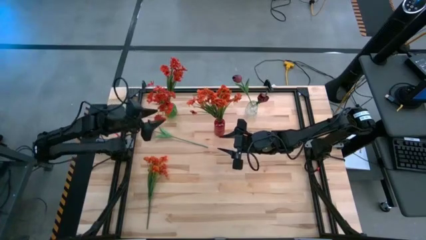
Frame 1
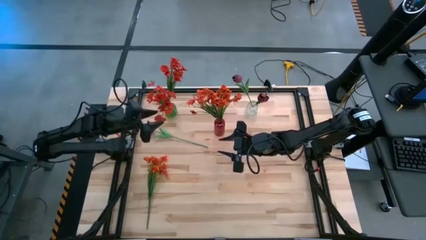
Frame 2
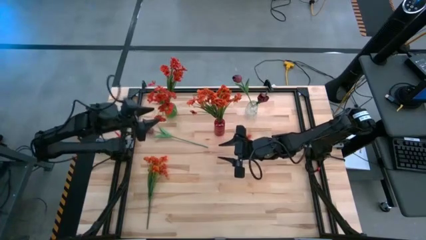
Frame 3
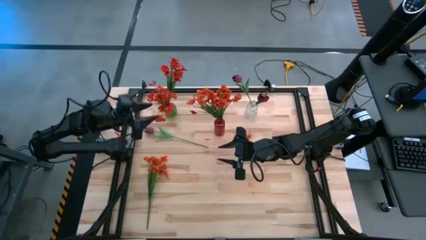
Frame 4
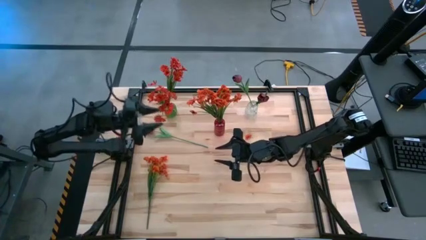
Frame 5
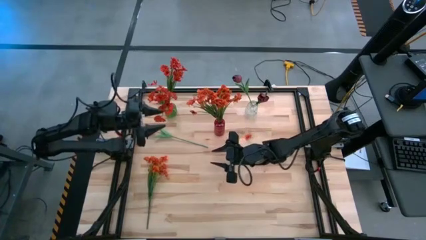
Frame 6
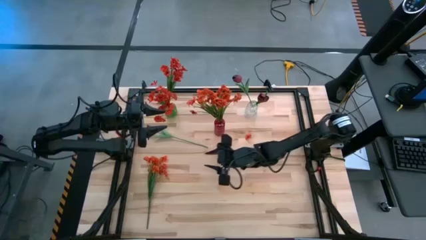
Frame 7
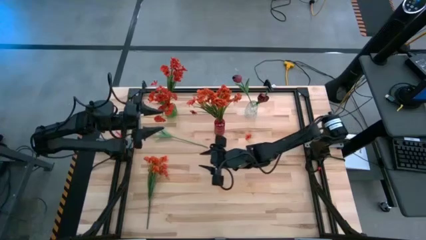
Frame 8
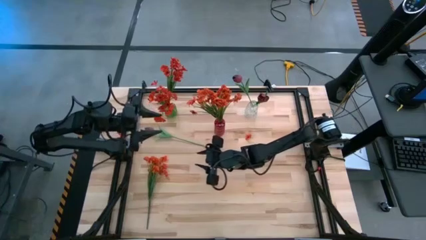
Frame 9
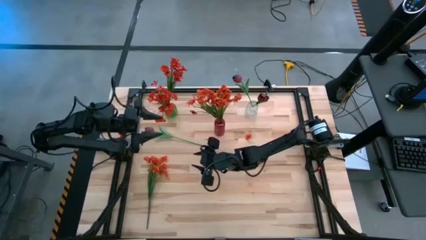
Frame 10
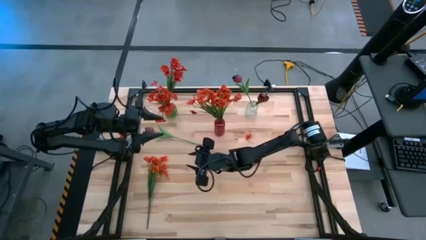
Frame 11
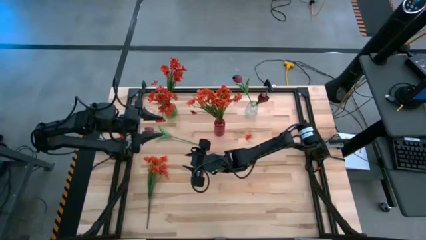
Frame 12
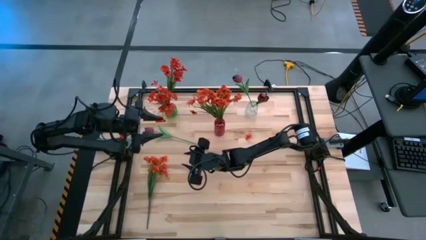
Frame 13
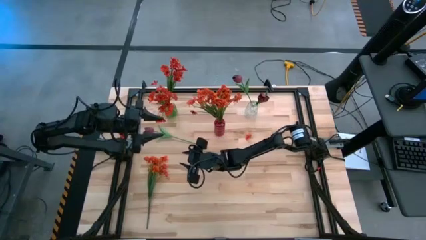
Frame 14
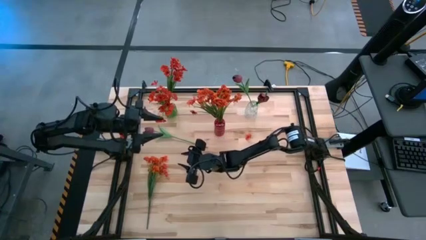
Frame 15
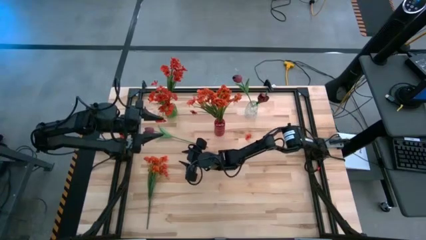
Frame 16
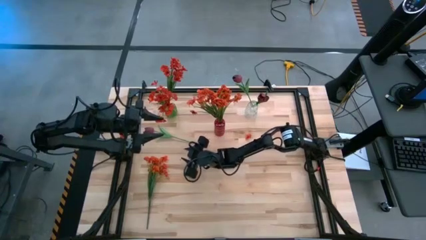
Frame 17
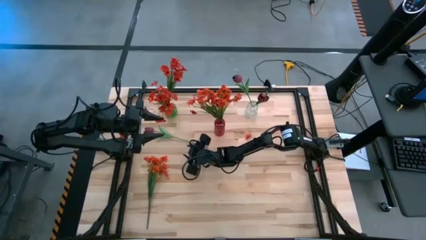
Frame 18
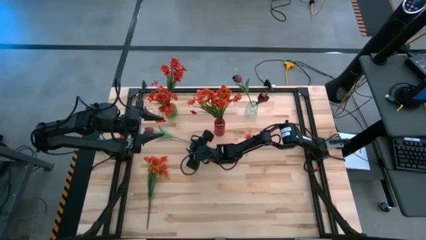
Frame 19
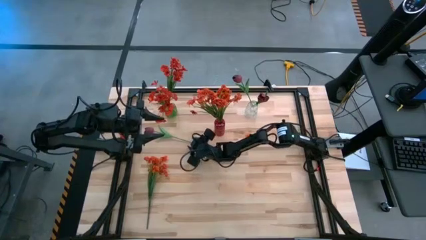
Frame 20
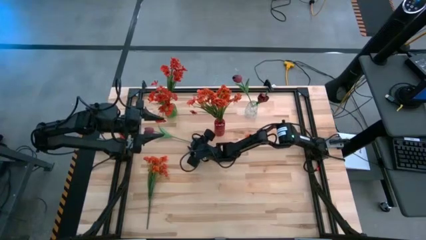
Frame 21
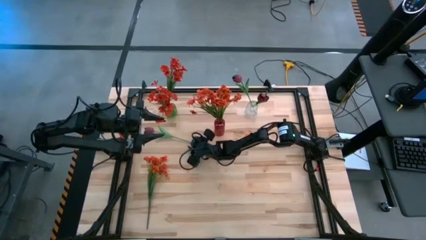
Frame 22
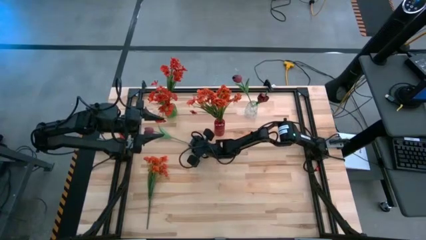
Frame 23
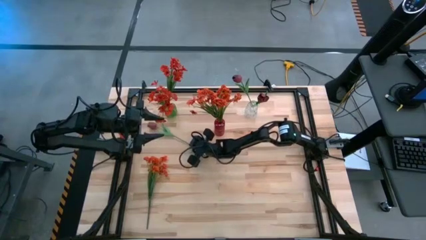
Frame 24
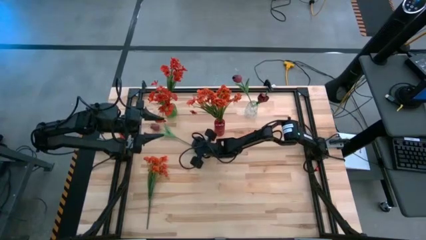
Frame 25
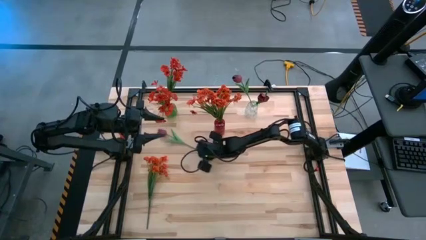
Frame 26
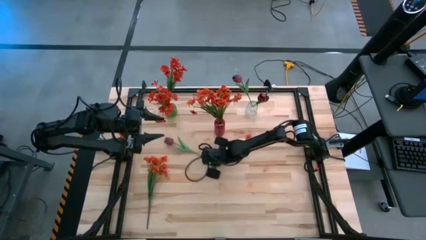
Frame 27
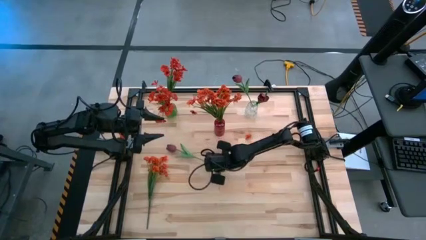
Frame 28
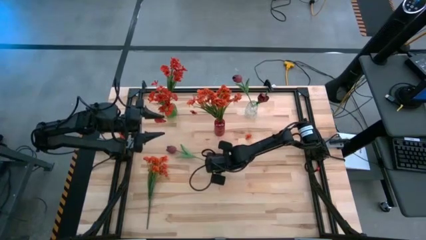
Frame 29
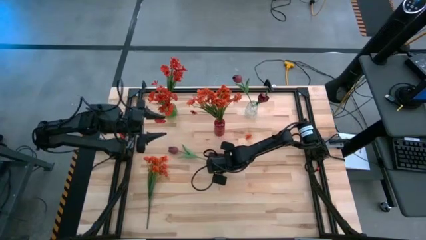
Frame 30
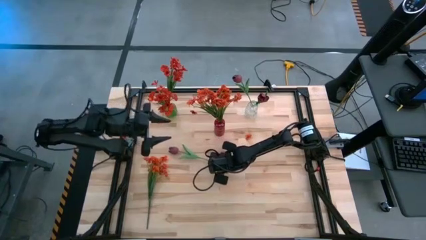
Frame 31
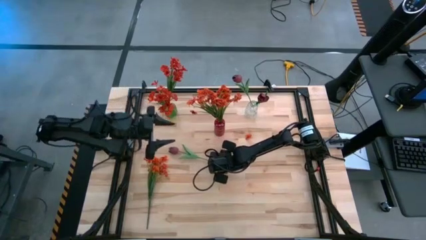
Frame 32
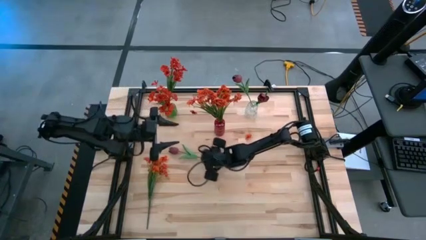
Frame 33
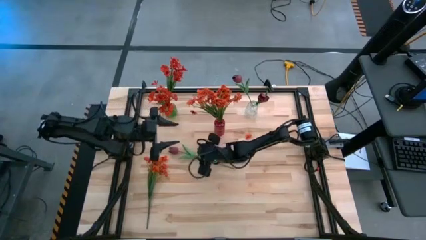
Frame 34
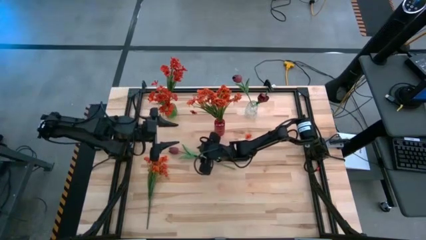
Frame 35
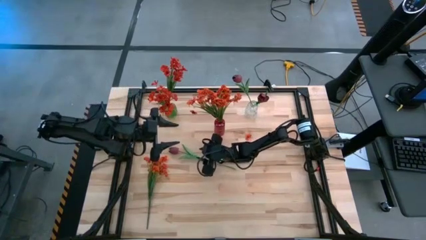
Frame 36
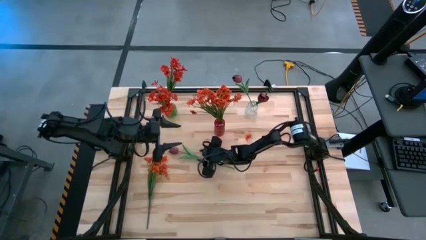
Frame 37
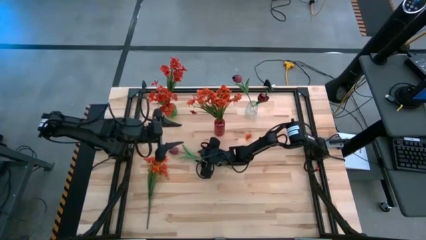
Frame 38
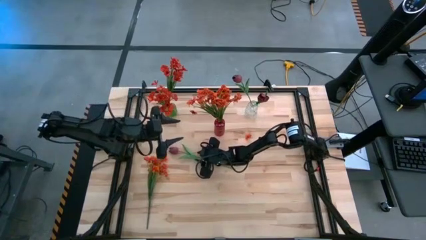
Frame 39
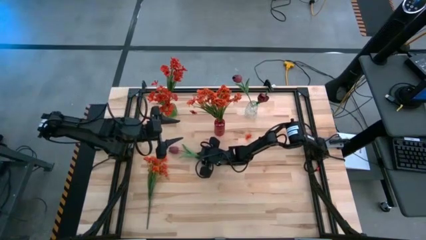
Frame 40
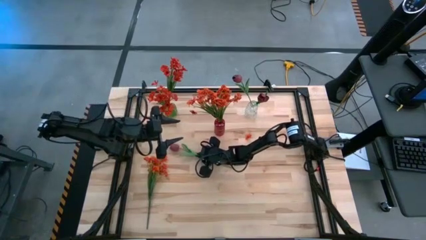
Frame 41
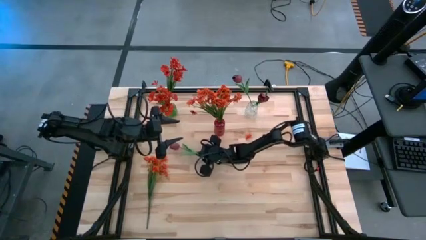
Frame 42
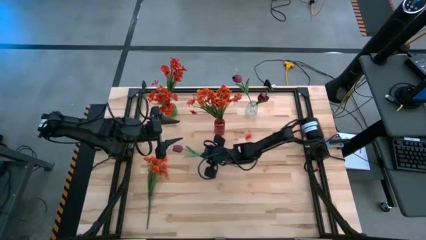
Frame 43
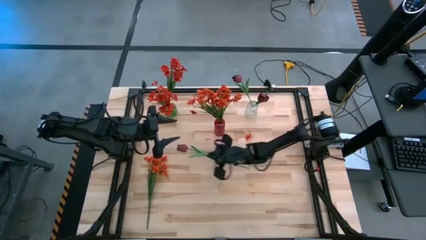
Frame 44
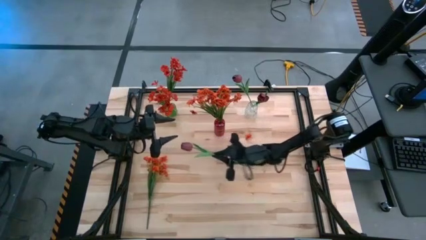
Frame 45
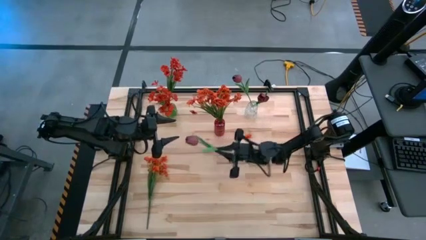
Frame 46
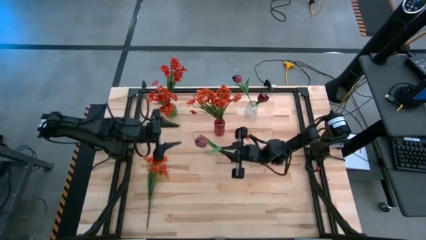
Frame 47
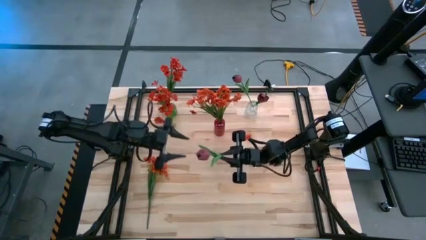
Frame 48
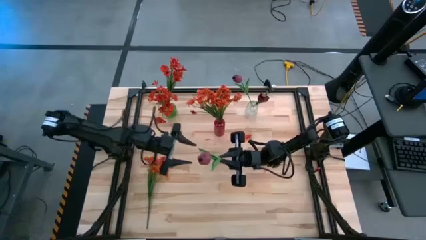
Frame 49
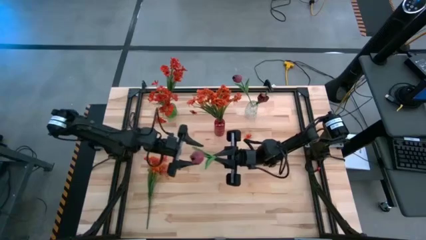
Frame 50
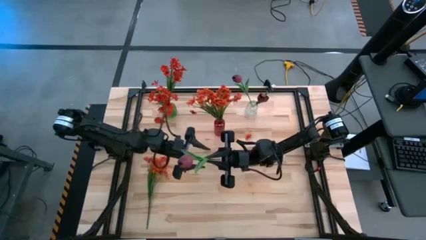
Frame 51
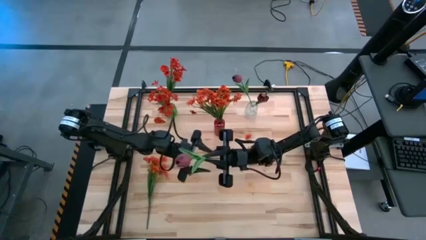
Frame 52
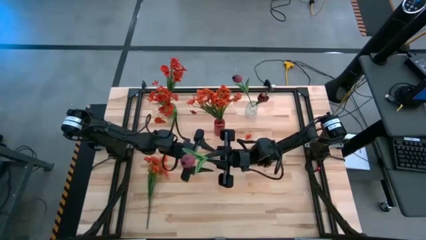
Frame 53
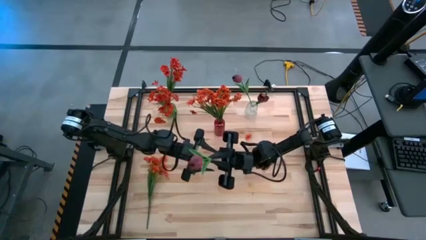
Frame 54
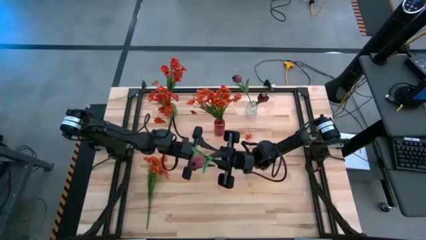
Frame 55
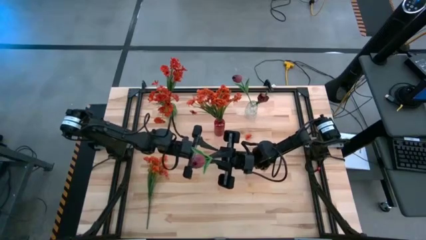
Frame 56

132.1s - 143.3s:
Task: Sort flowers into vase by color
Put the red flower into the transparent vase

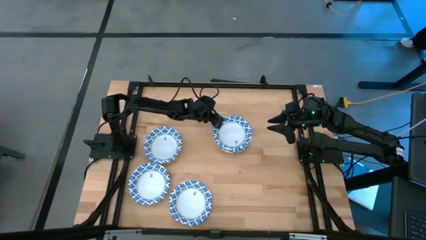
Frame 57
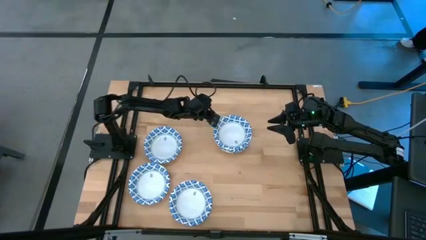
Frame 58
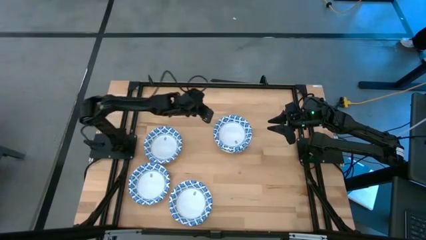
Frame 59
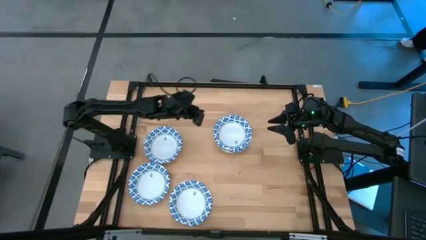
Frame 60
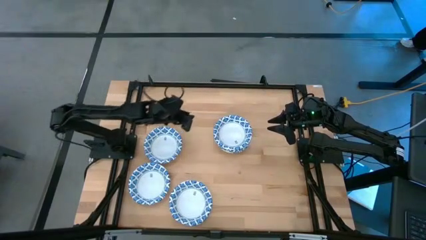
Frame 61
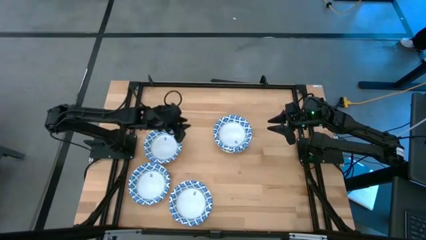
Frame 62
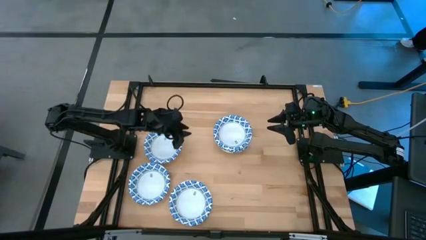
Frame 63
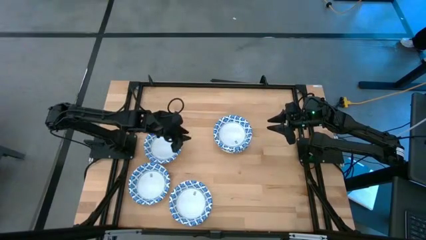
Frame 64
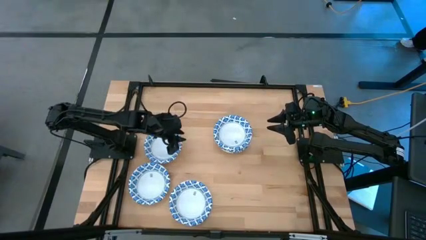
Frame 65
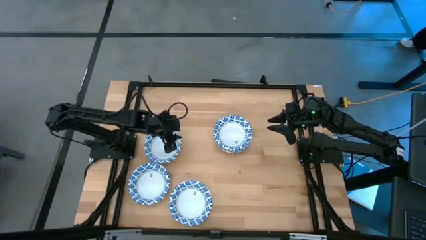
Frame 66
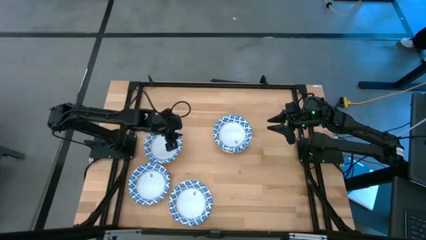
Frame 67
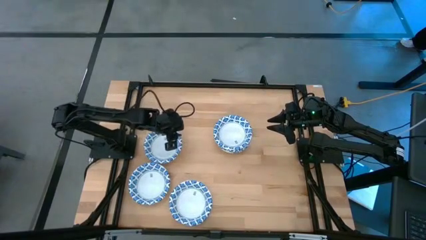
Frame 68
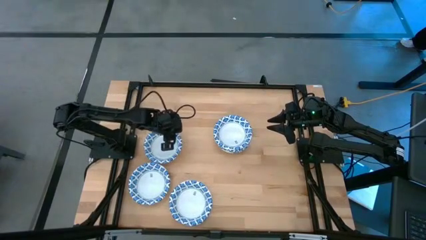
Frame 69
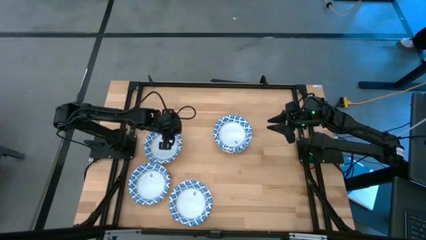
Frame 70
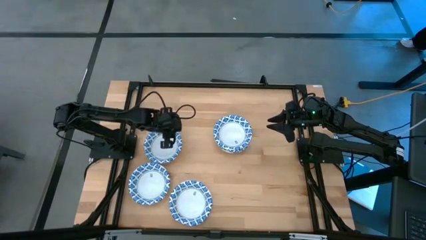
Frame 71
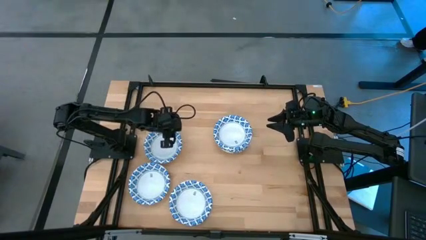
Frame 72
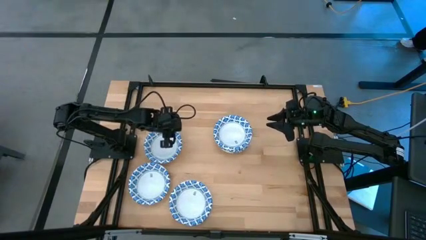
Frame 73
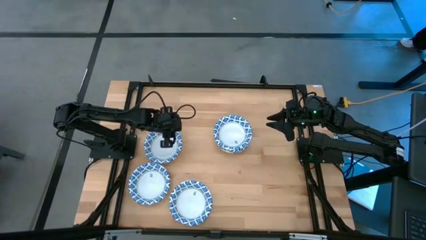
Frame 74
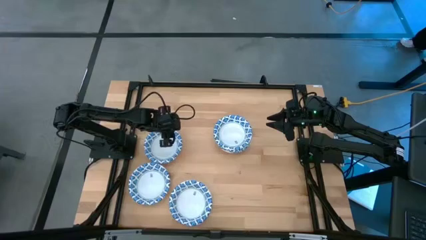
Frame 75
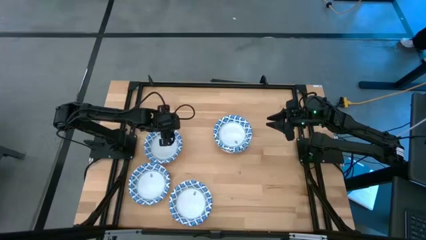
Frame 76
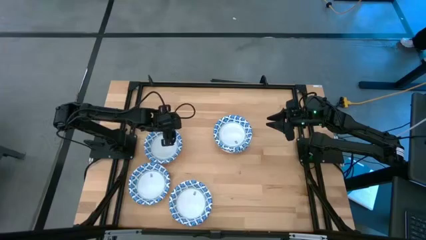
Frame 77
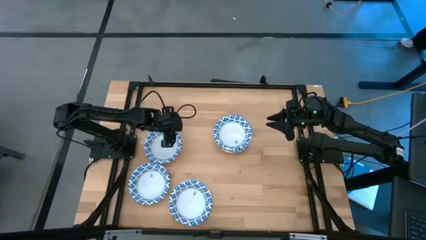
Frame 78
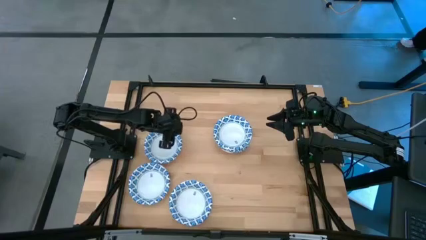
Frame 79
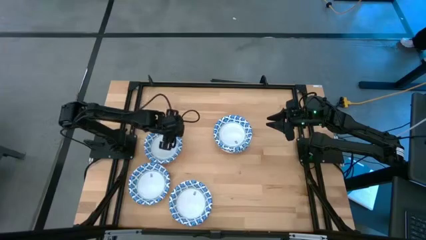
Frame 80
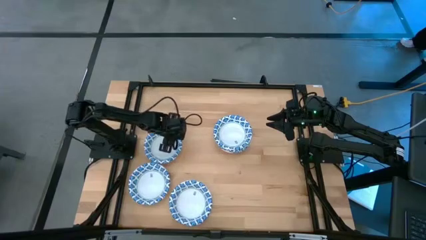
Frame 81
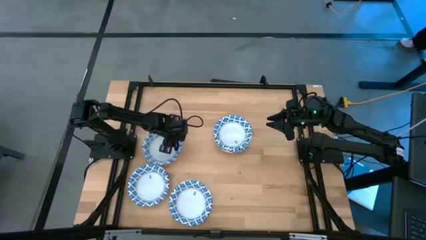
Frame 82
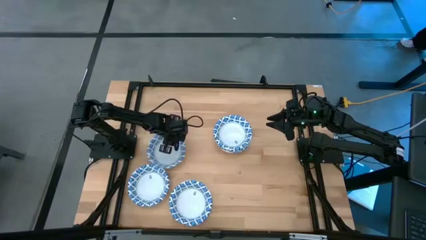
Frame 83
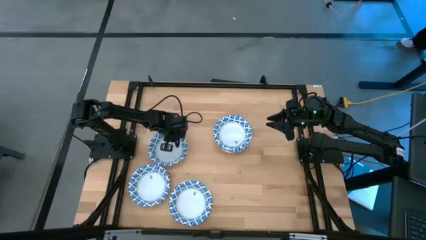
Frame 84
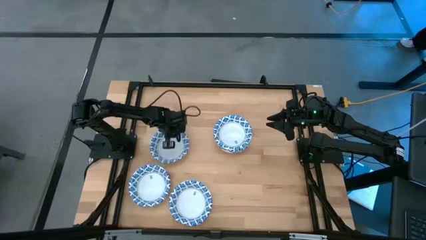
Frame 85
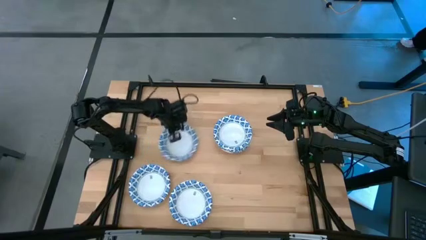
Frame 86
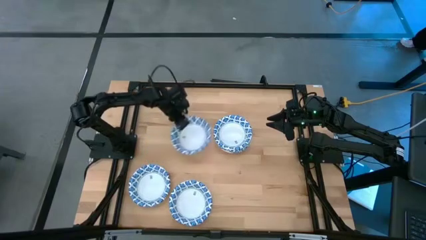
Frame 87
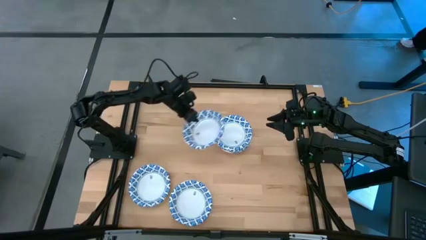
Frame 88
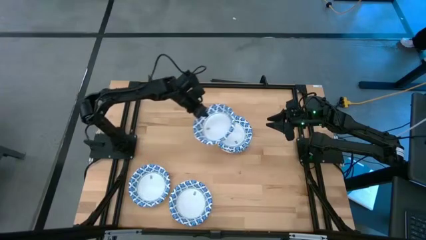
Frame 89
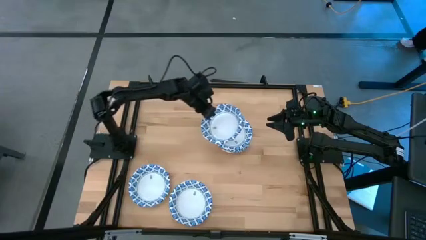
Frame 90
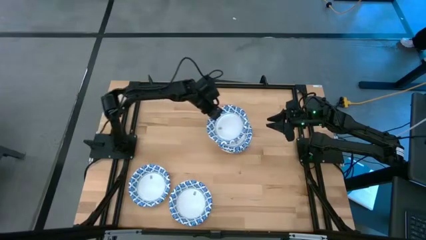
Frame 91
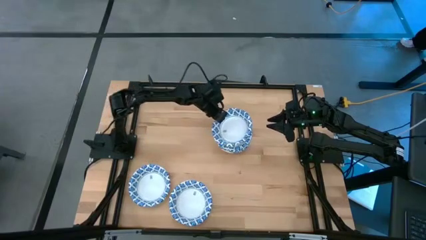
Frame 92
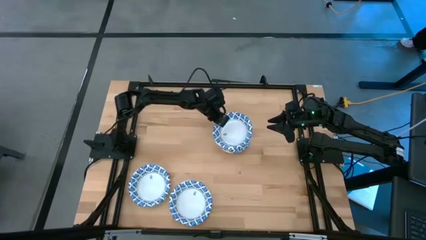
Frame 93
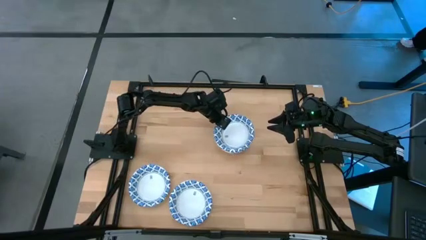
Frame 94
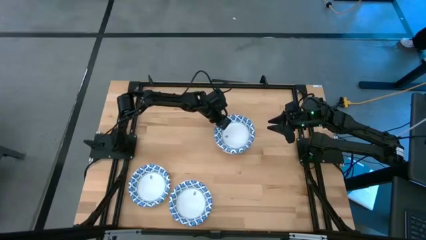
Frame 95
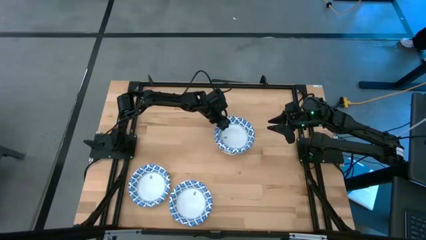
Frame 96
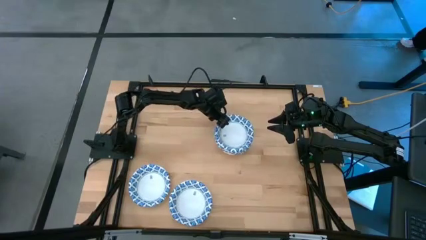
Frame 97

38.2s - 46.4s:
Task: Nest bowls inside each other
Stack the blue patterned bowl on top of the other blue patterned bowl
